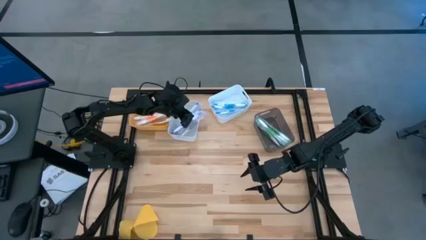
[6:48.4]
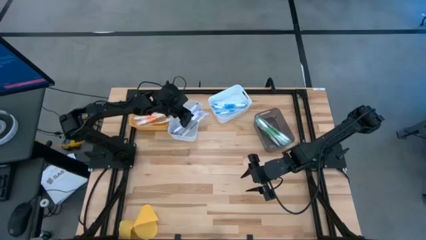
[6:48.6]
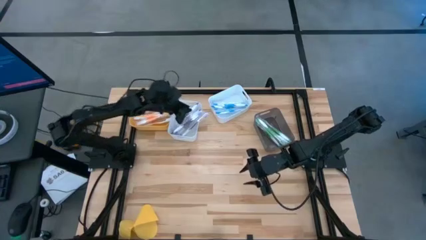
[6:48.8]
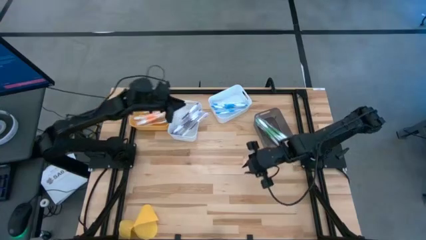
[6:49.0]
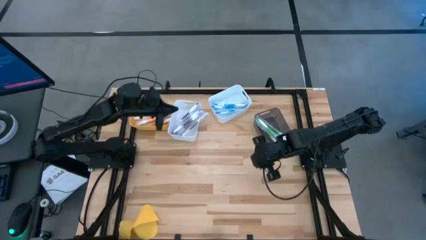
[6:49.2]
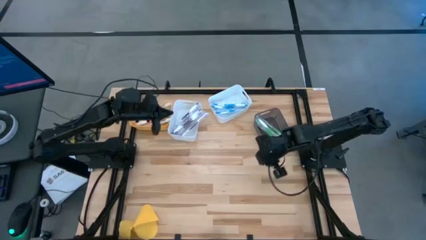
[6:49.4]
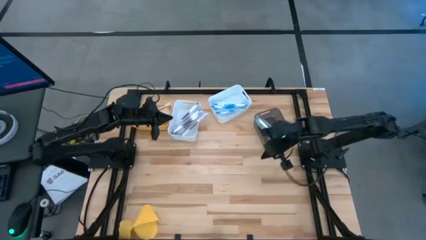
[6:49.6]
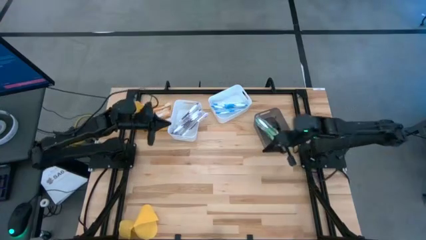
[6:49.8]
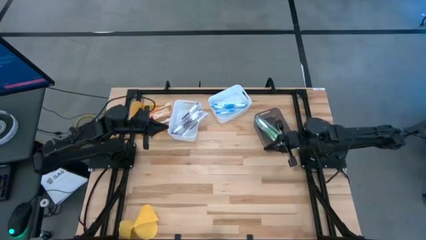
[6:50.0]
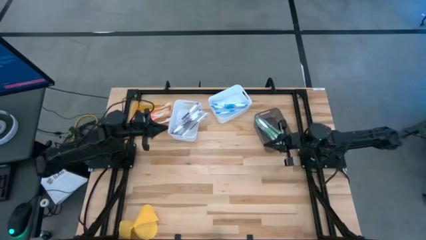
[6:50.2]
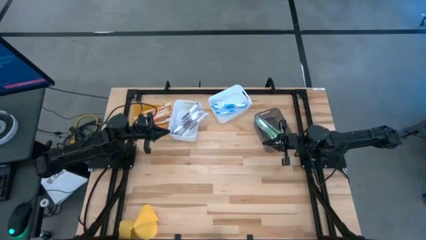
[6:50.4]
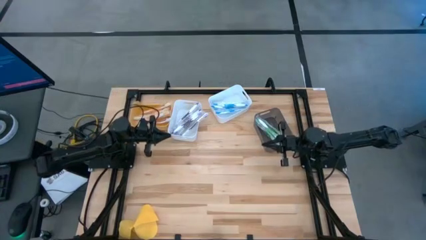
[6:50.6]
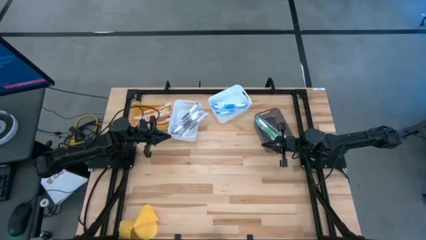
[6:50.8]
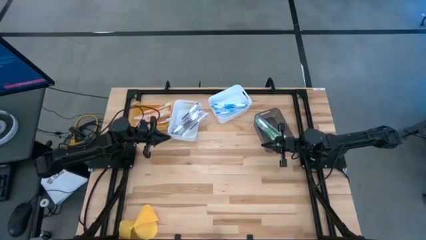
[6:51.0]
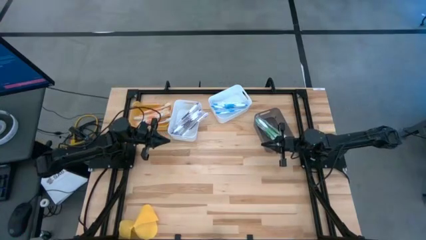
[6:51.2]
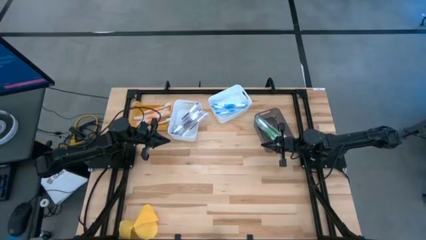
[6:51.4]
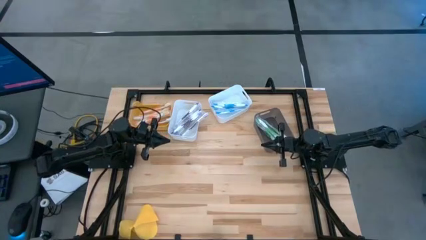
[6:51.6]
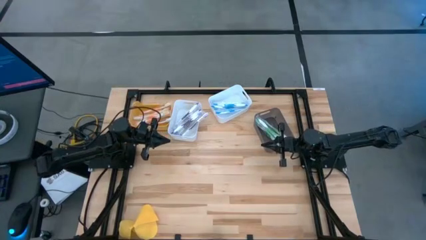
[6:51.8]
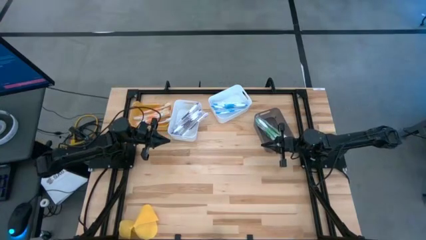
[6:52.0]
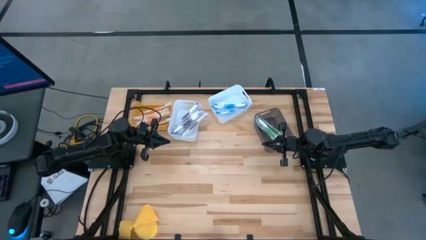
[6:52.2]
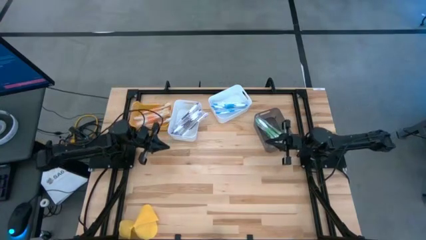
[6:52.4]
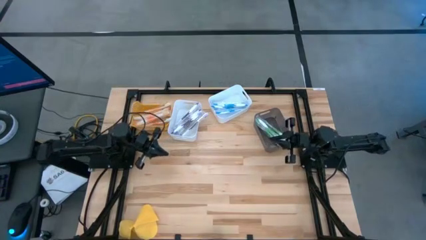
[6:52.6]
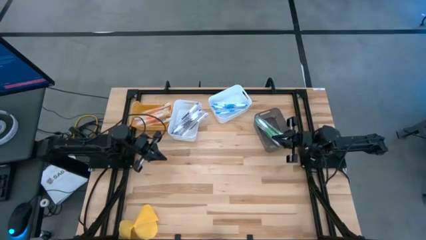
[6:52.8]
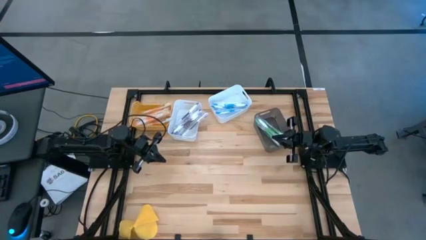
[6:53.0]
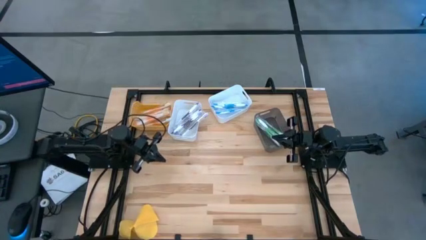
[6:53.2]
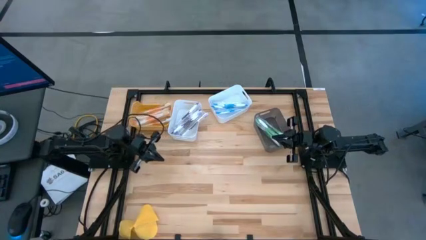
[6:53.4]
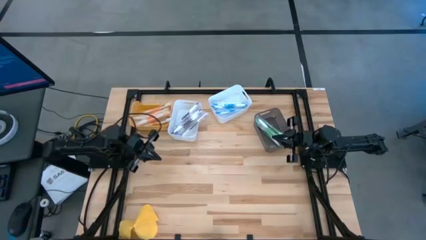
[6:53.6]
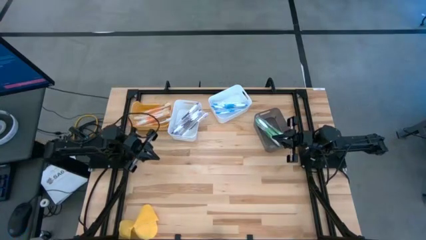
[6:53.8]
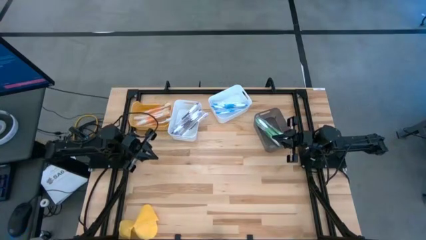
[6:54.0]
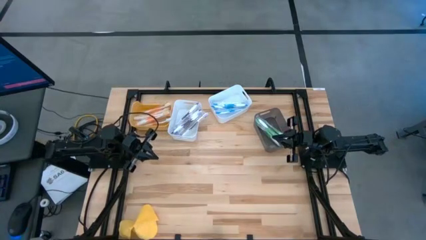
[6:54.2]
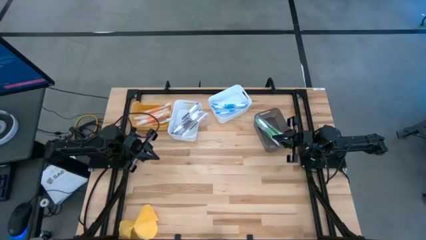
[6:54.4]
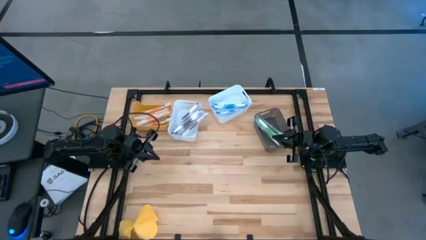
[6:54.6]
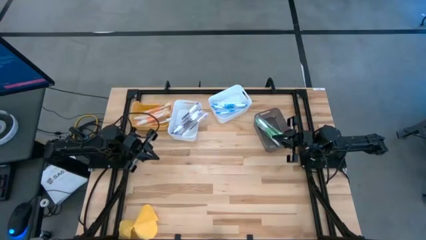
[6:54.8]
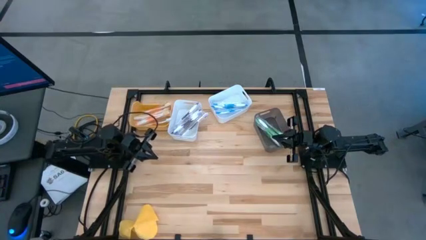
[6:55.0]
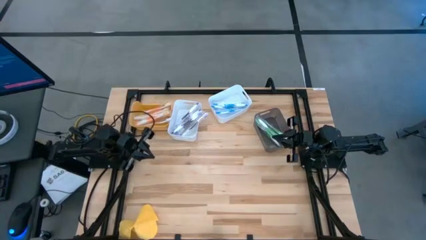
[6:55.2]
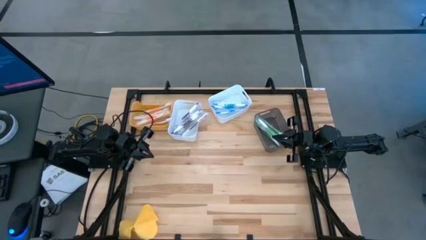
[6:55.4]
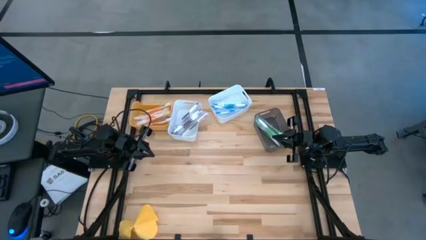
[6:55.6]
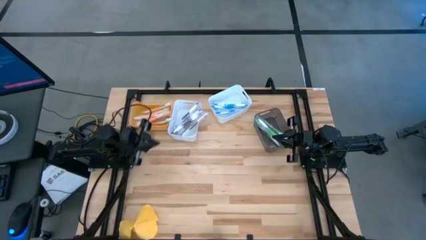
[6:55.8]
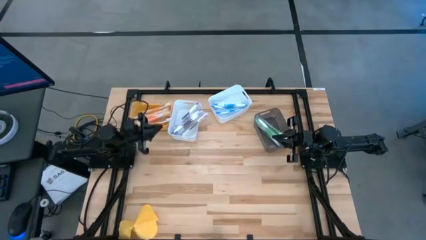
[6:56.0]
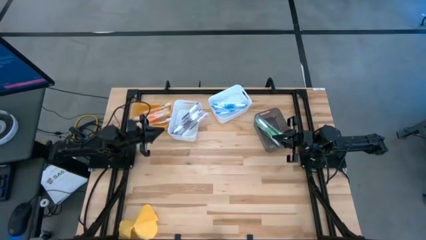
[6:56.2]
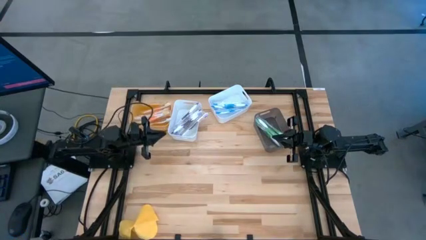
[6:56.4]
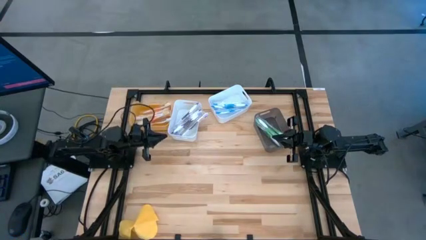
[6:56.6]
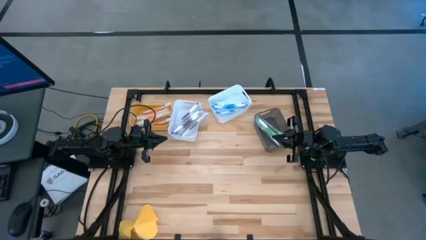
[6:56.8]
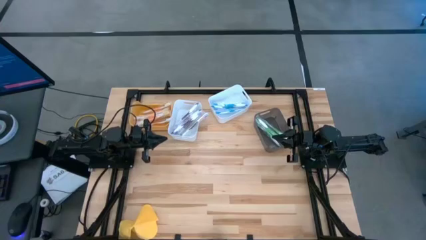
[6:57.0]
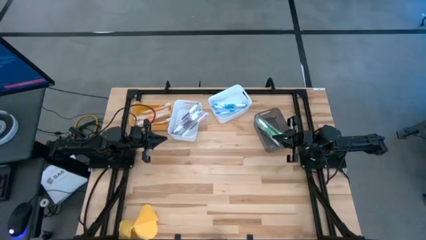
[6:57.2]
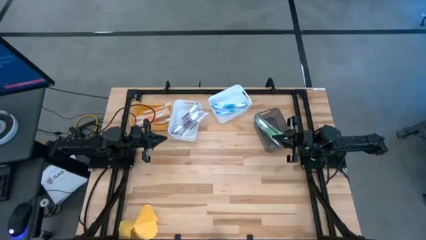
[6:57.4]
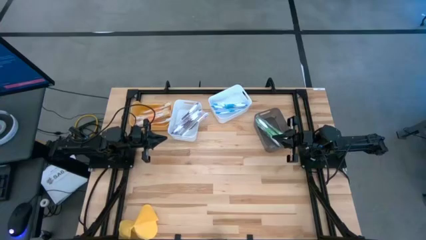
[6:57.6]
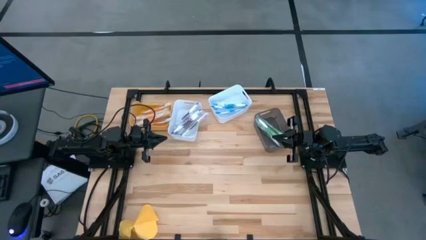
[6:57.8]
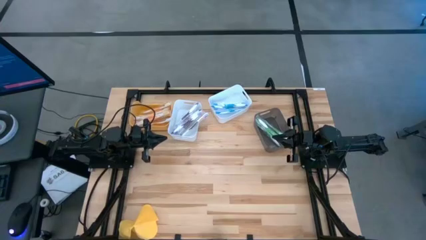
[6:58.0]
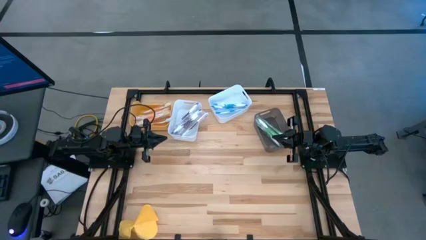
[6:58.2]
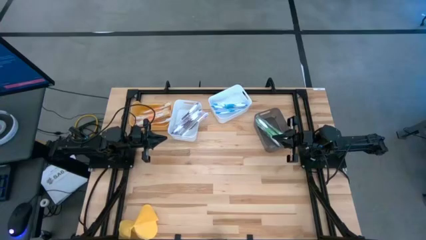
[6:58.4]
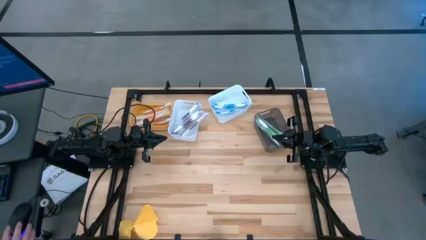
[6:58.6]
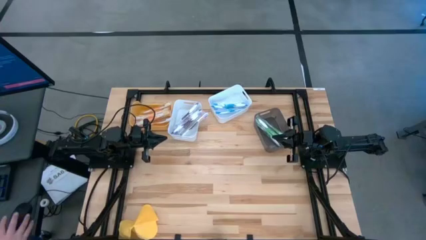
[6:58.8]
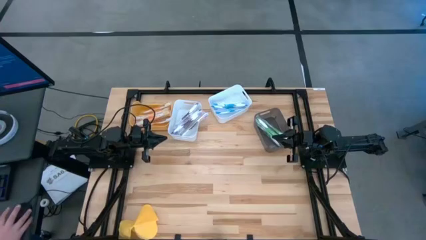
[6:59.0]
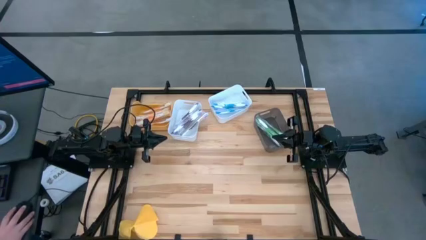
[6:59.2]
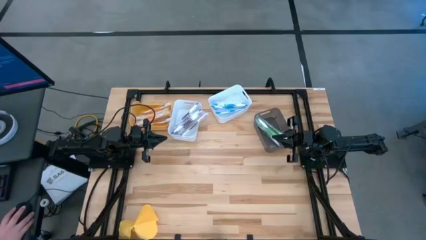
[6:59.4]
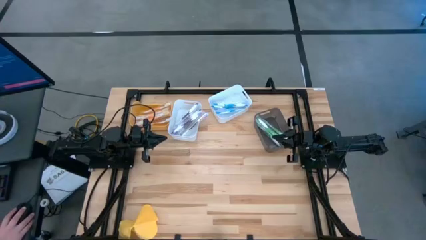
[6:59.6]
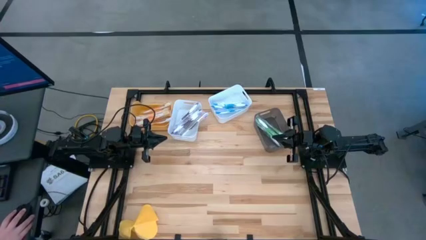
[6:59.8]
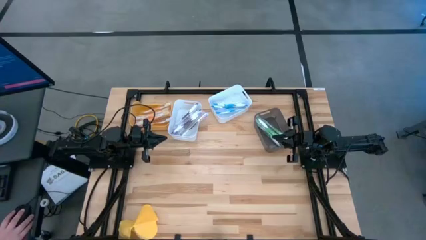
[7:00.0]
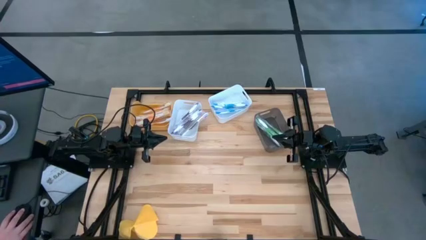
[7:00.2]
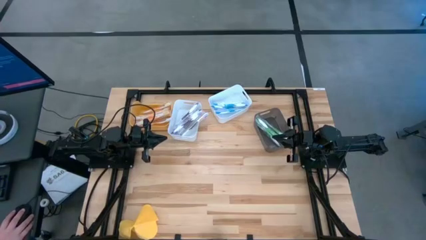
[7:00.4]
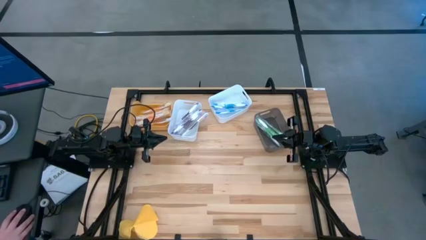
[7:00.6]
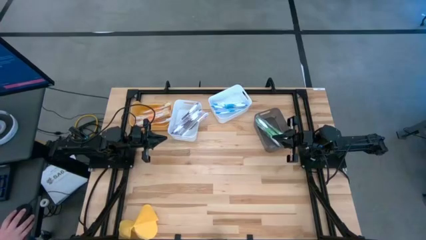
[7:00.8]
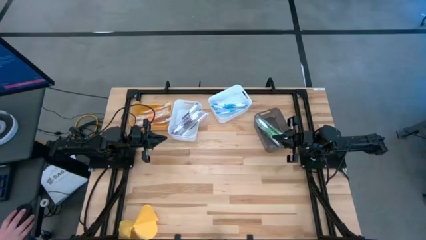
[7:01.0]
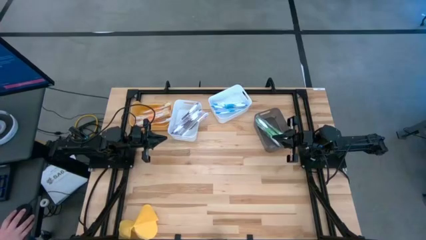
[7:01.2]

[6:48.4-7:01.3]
Task: Pick & Place Toothbrushes
Return to Home Position

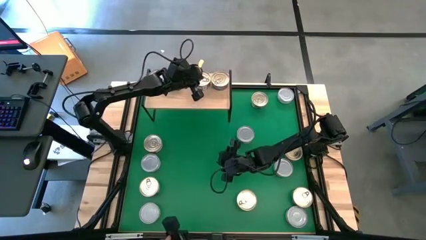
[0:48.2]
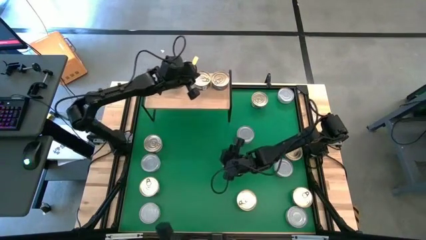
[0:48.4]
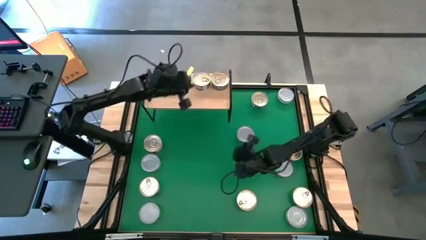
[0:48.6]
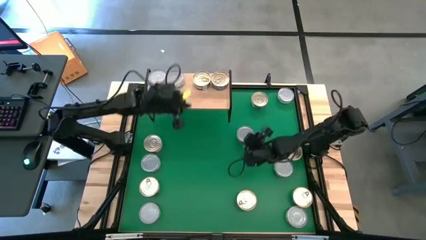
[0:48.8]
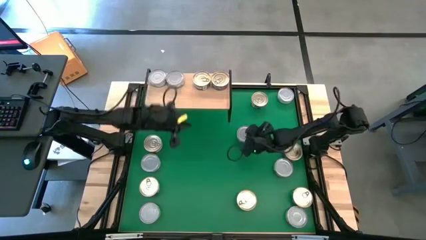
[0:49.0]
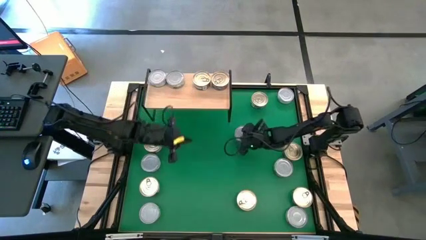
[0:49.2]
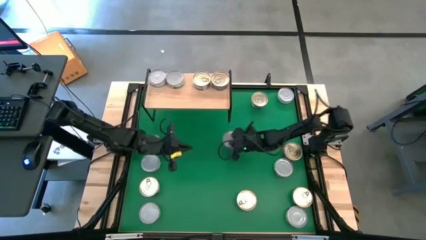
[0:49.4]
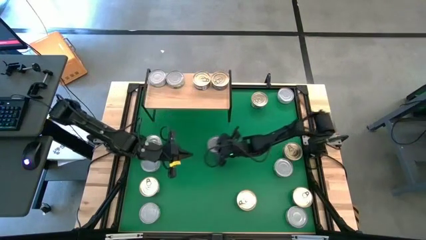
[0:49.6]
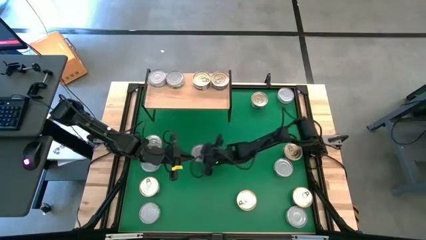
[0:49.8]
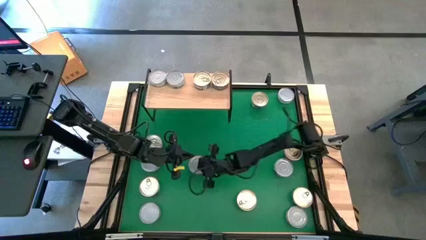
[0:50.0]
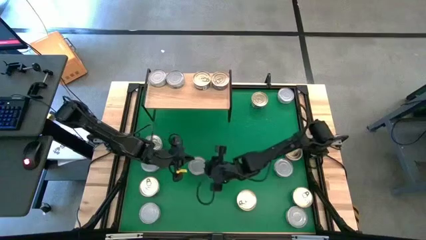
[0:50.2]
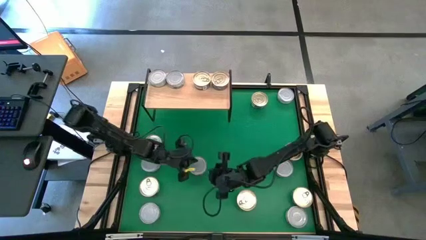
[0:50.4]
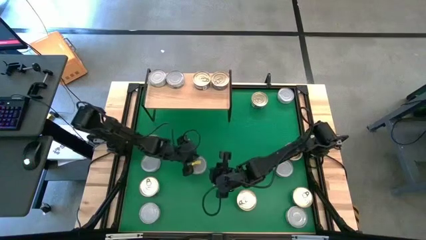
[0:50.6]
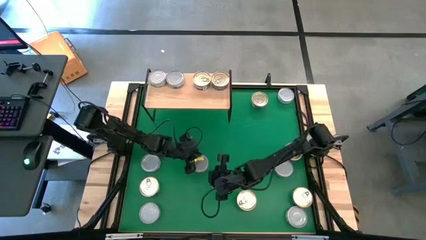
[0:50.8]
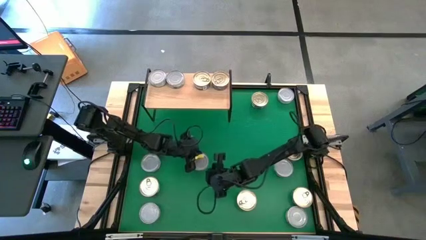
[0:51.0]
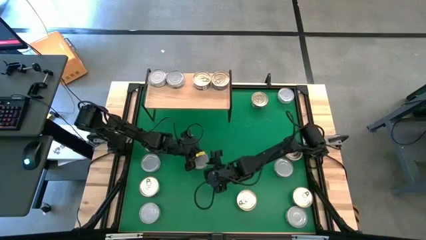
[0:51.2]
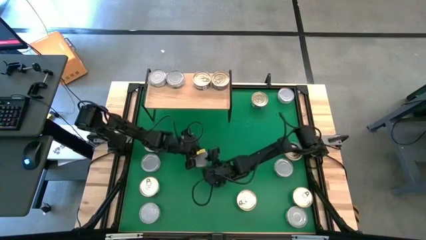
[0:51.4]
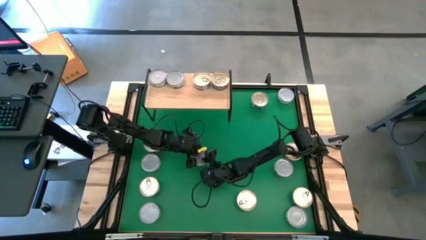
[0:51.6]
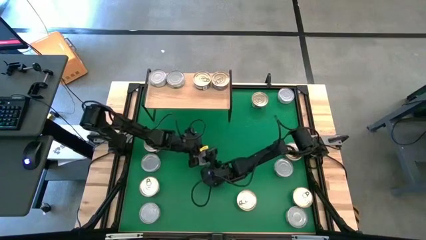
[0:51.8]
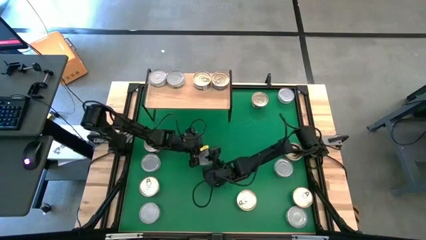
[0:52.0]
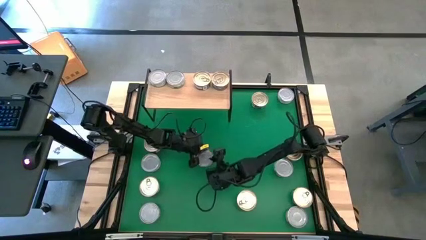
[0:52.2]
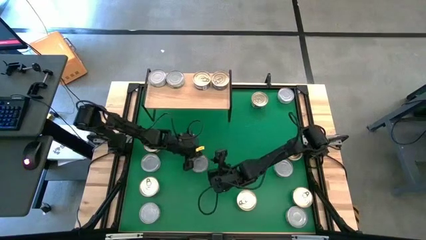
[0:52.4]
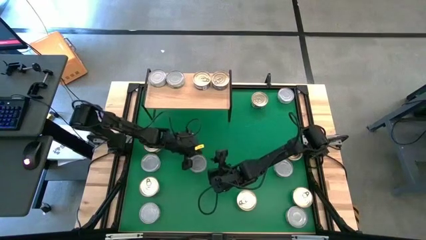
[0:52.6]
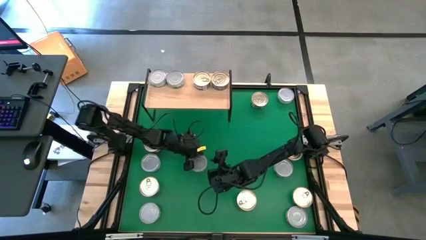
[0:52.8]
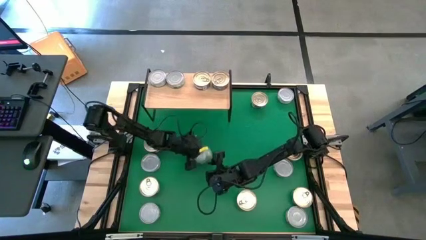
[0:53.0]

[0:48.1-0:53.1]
Task: Stack canned seafood by type on shelf
Put the green tuna can on the shelf
